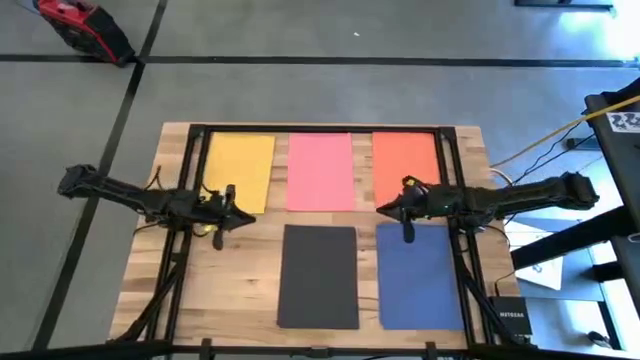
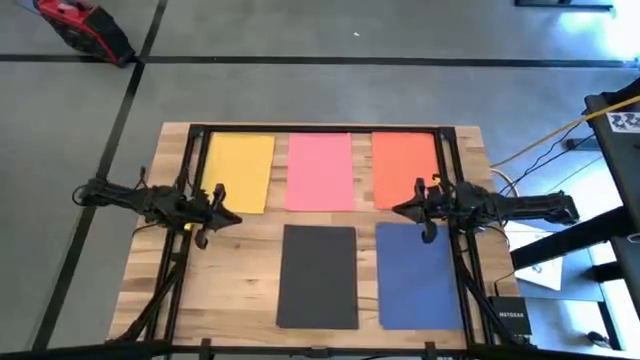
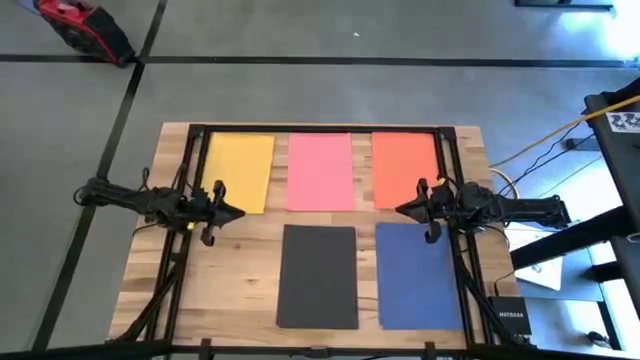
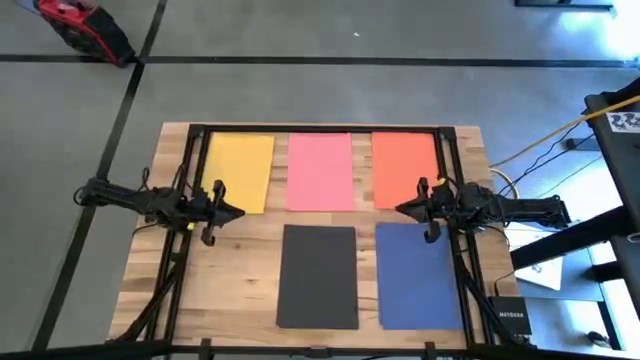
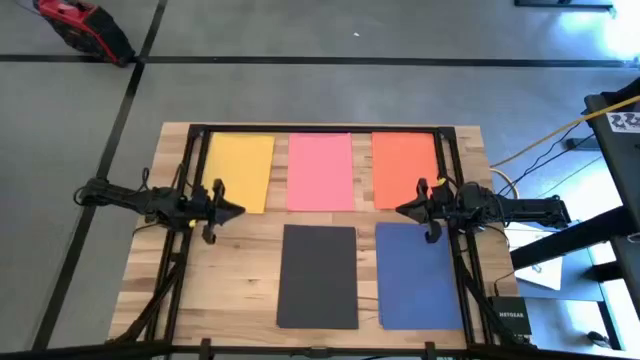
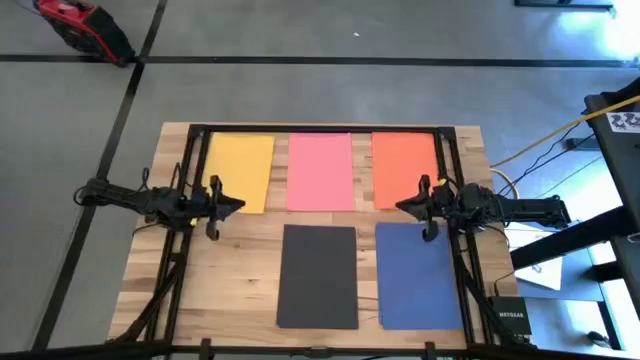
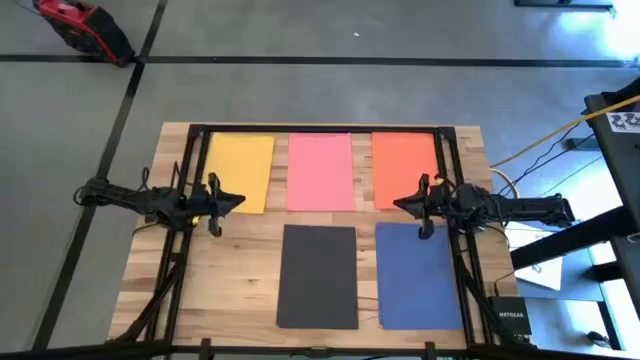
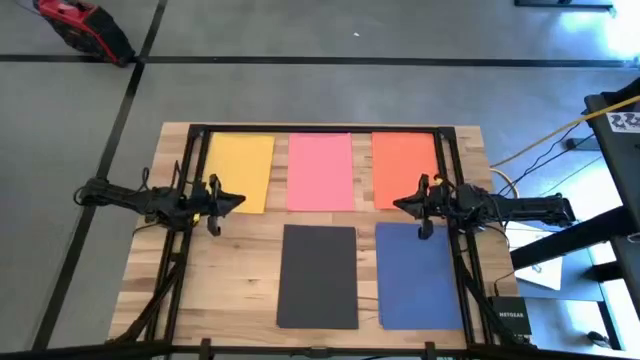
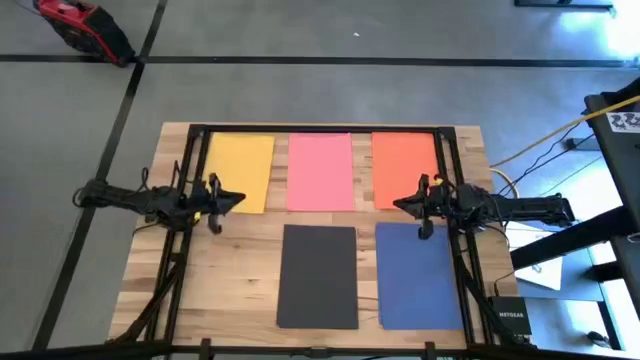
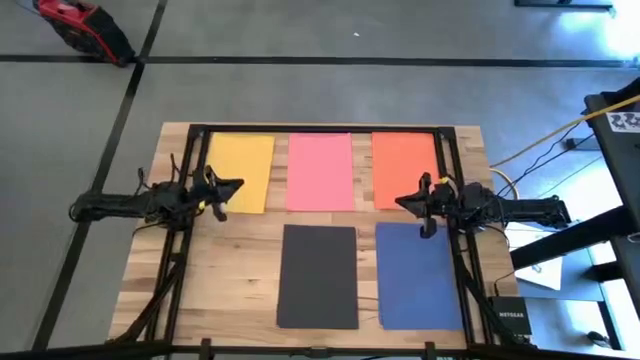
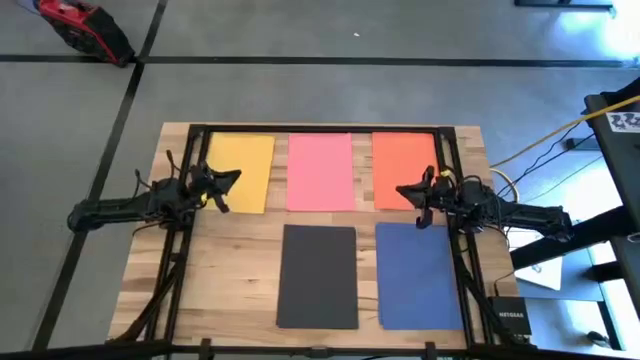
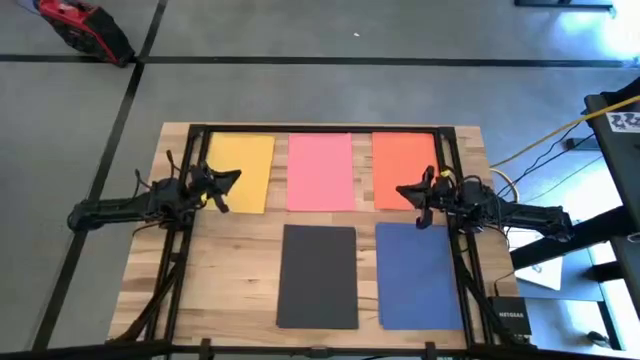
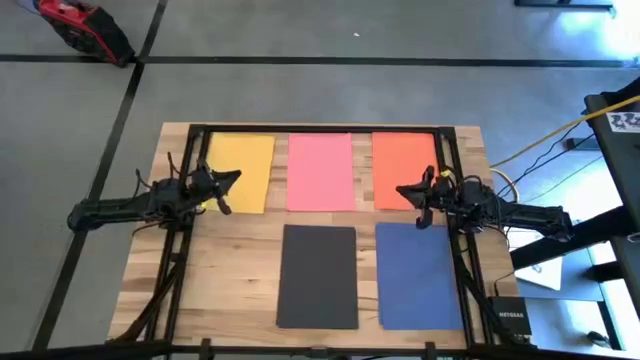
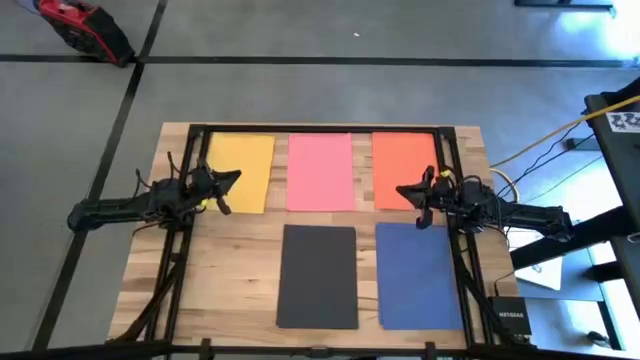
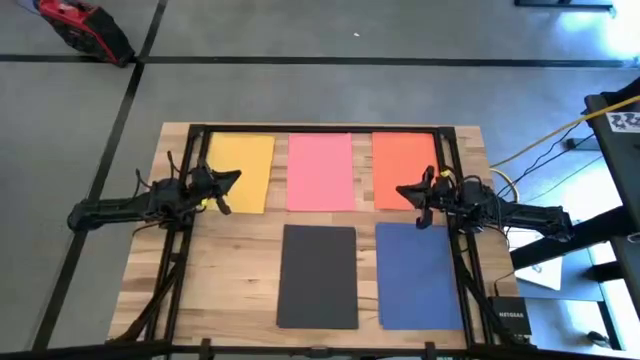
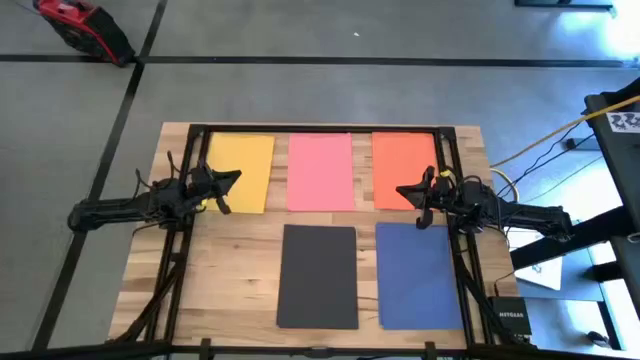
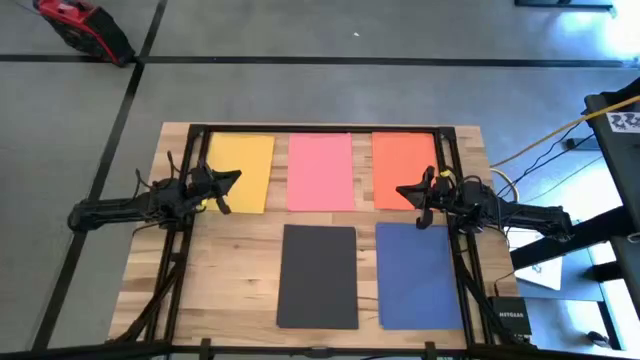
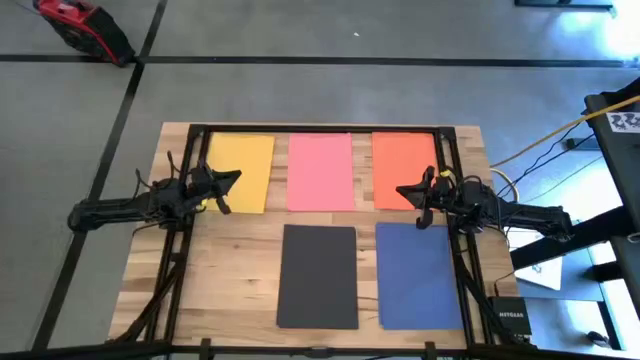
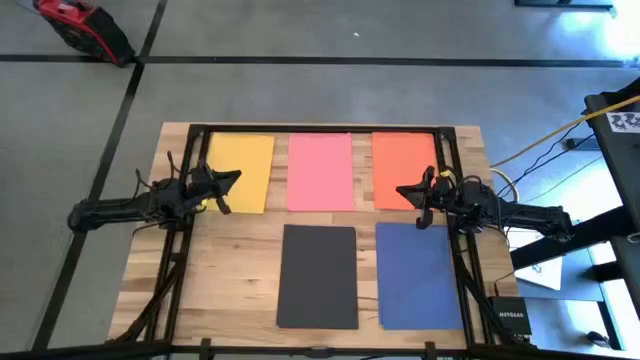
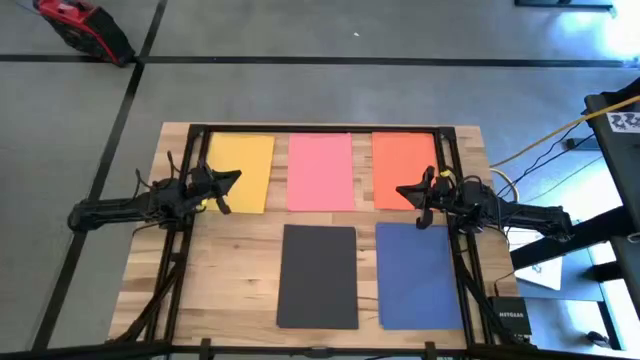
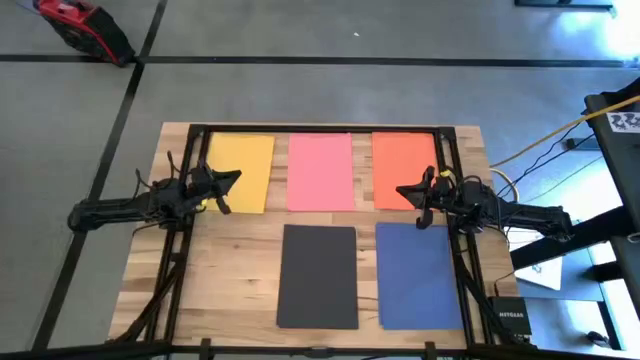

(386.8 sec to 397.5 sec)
Task: Organize paper
Return to Home Position

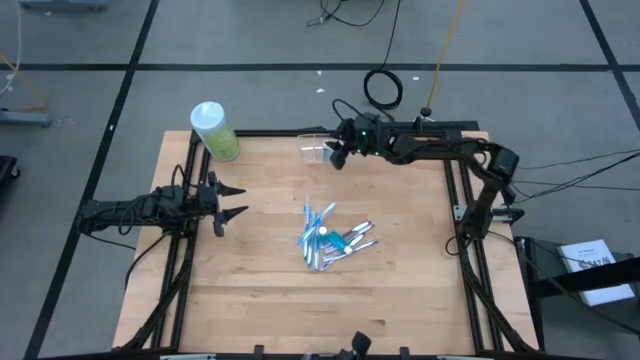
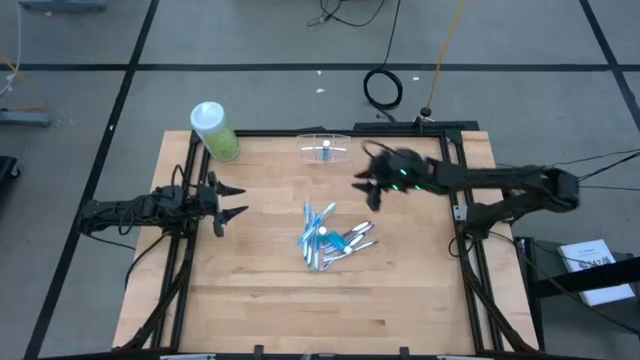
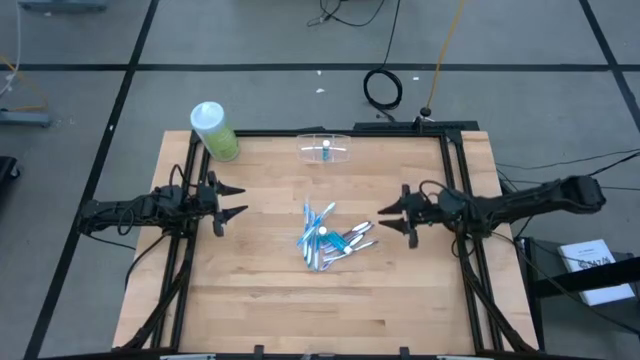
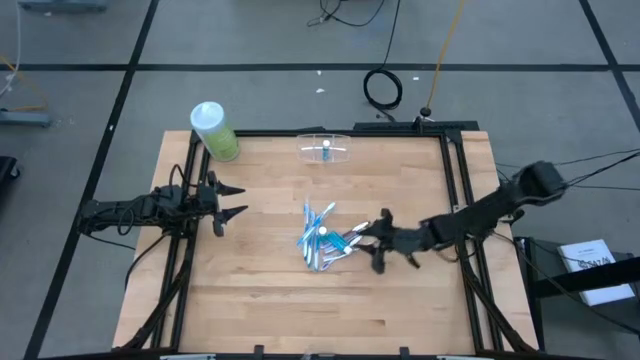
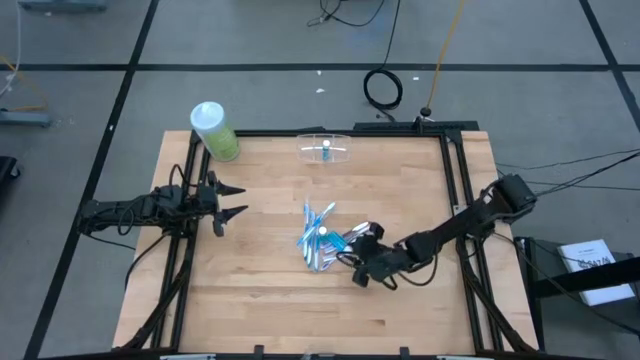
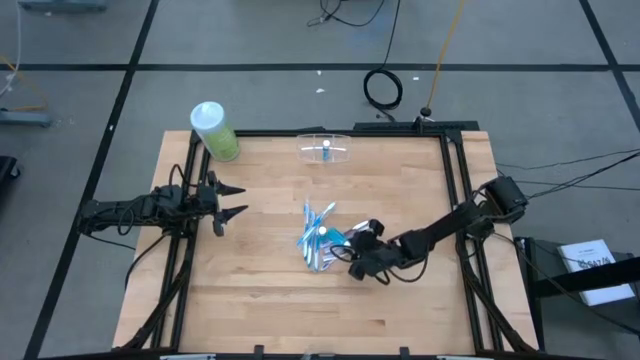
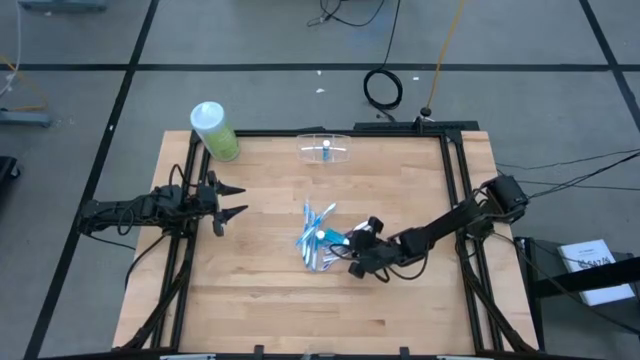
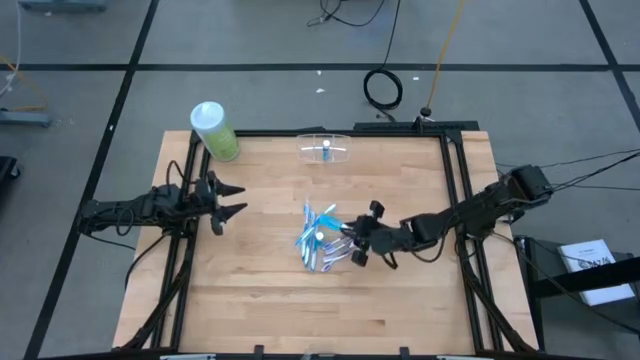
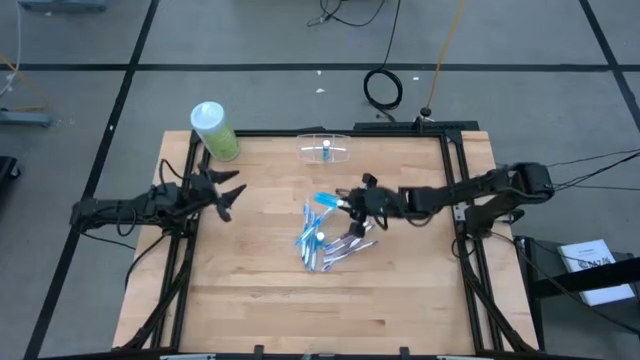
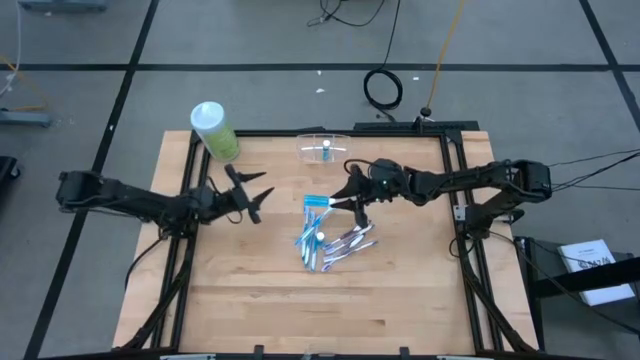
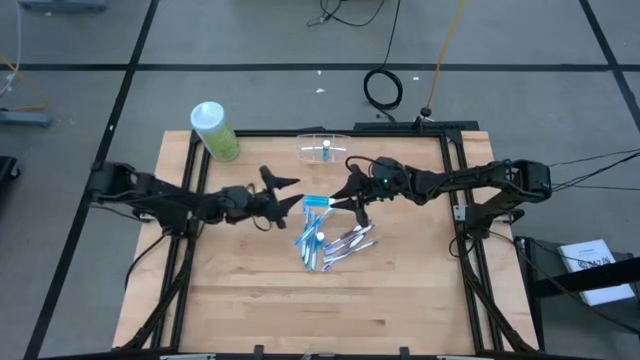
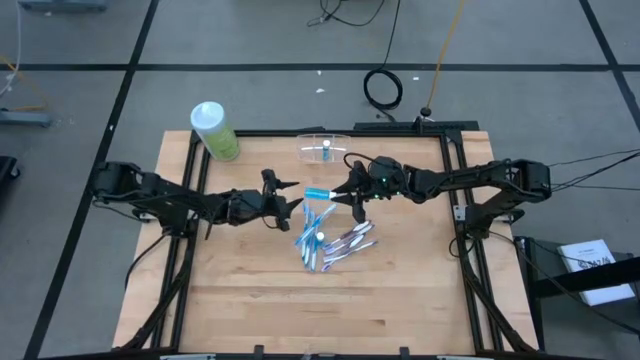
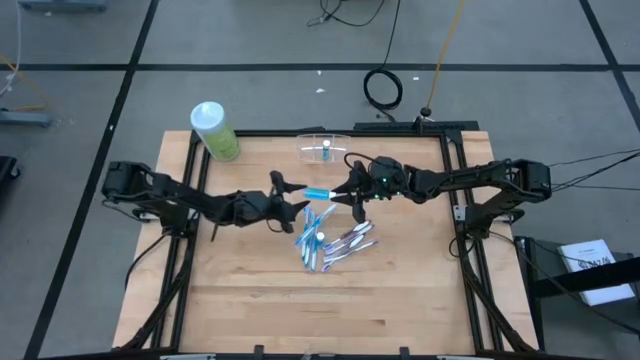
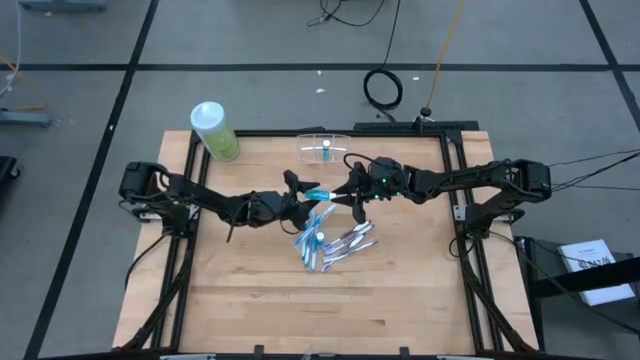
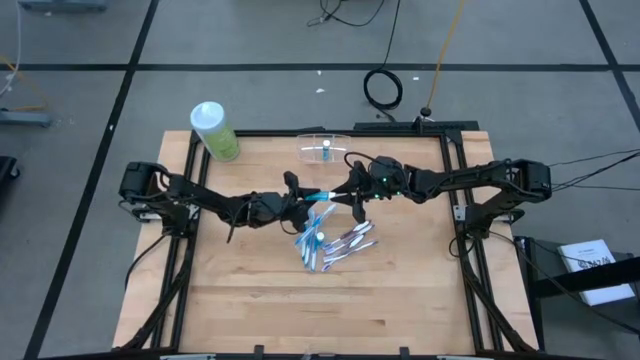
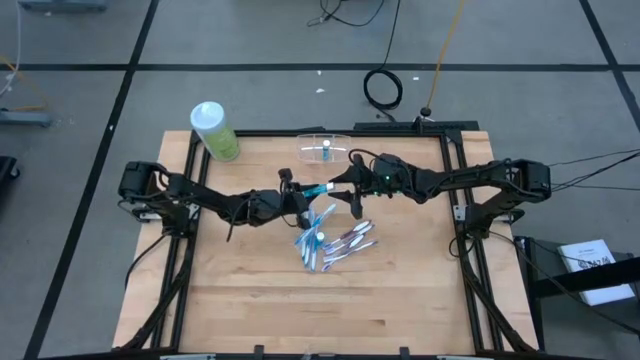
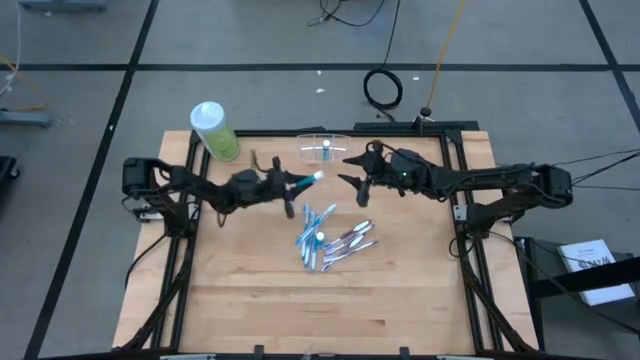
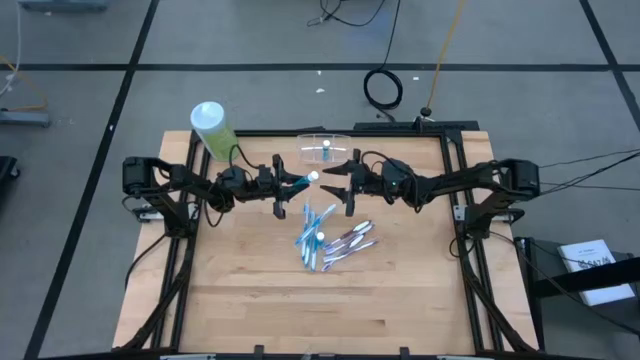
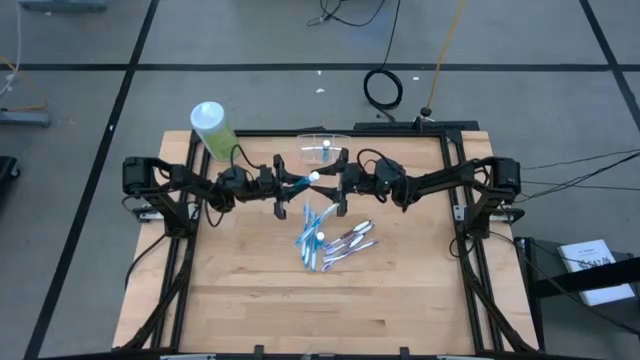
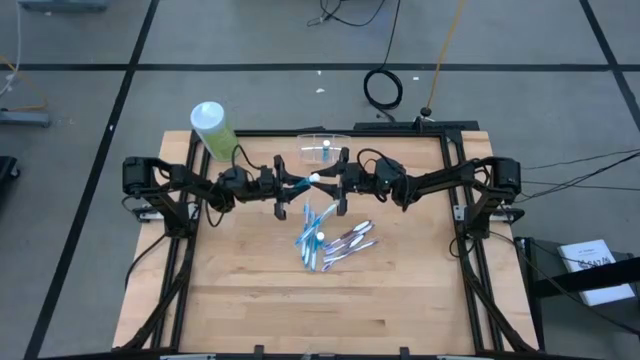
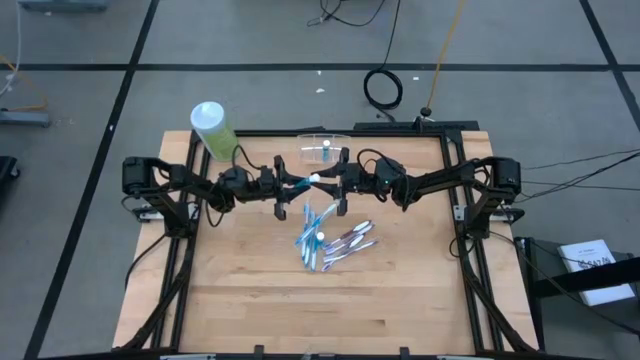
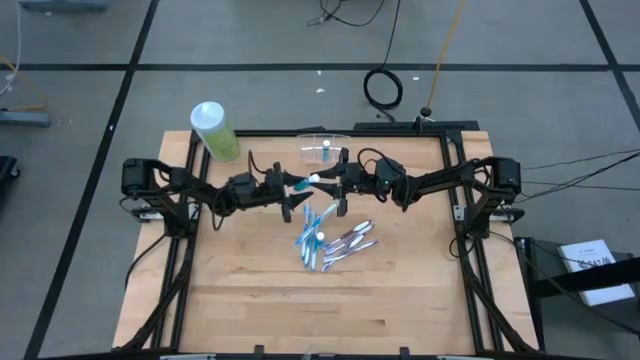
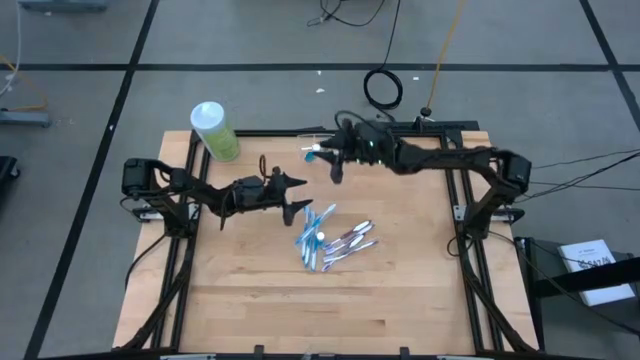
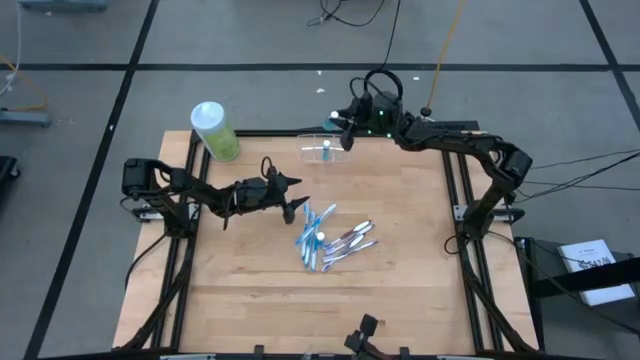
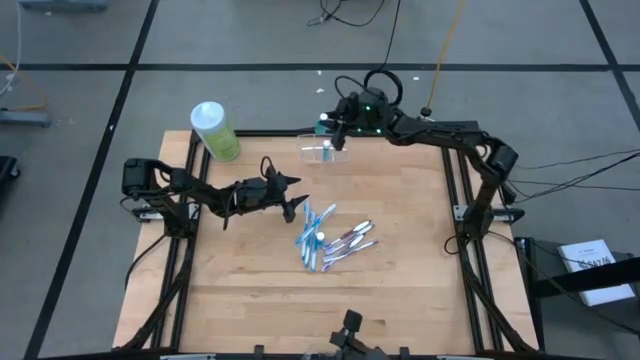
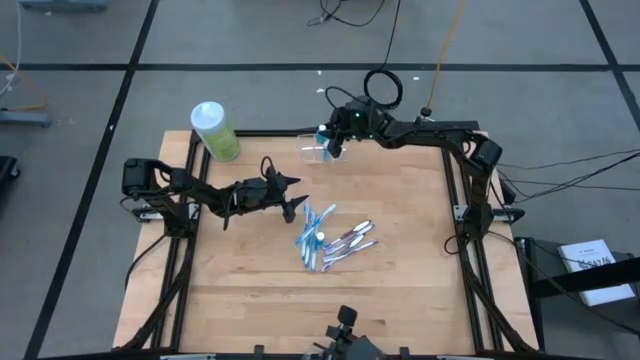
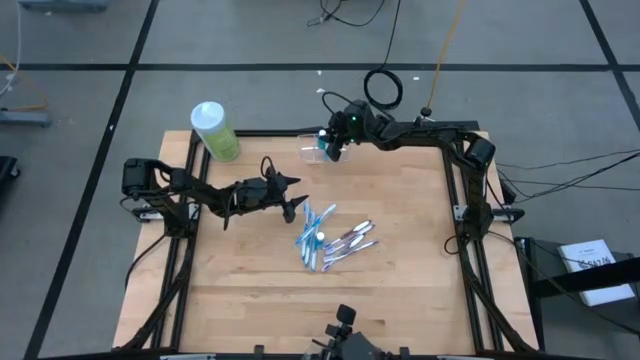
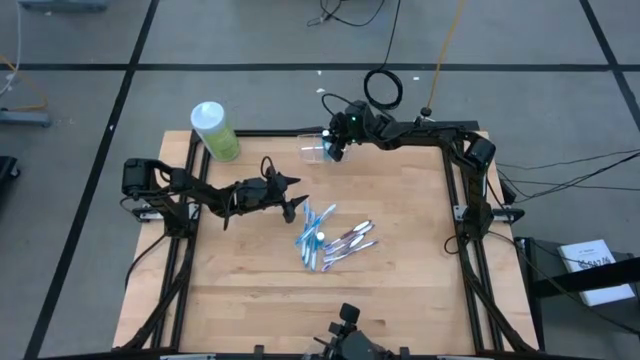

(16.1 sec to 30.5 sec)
Task: Pick & Place toothbrushing station
Put the mouthwash into the transparent organizer
